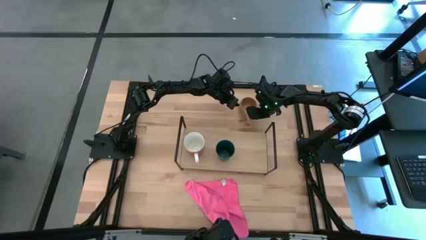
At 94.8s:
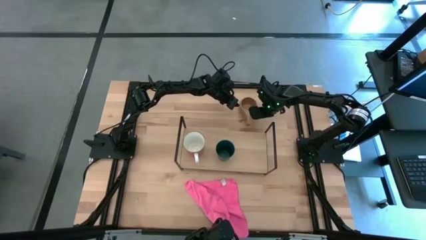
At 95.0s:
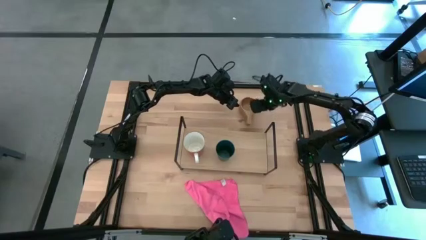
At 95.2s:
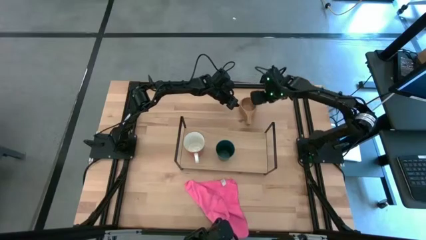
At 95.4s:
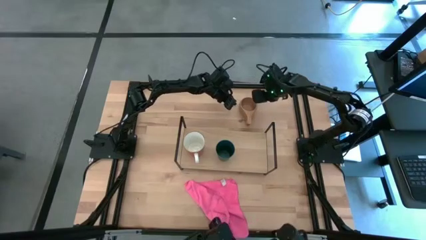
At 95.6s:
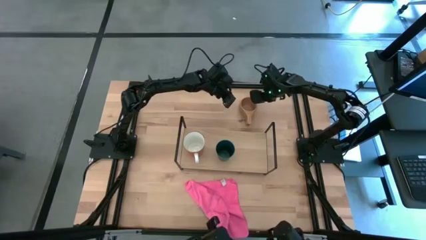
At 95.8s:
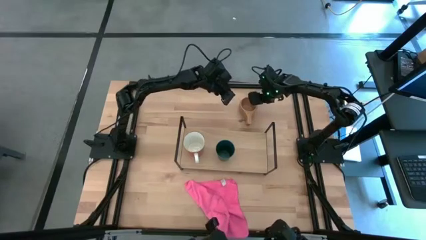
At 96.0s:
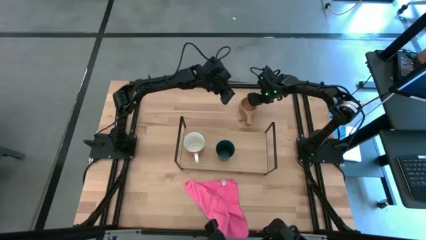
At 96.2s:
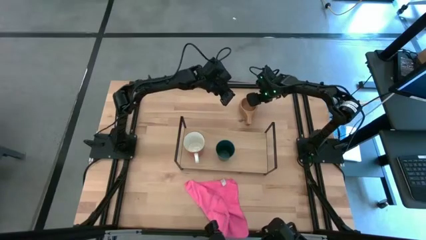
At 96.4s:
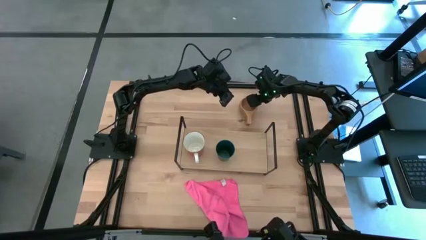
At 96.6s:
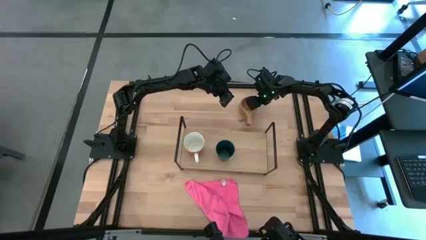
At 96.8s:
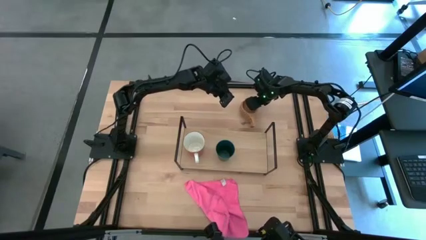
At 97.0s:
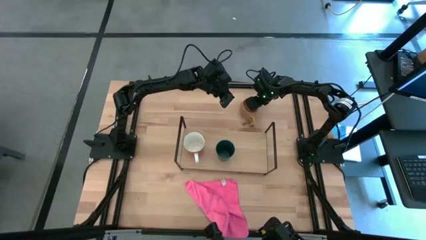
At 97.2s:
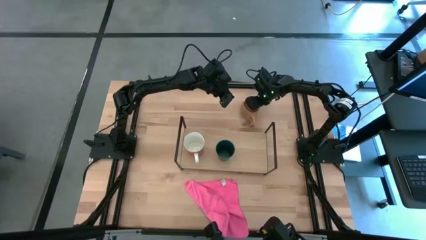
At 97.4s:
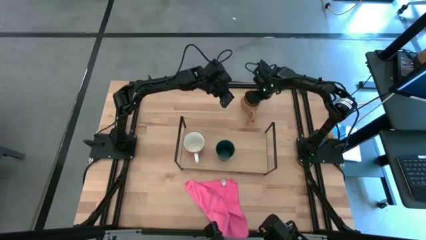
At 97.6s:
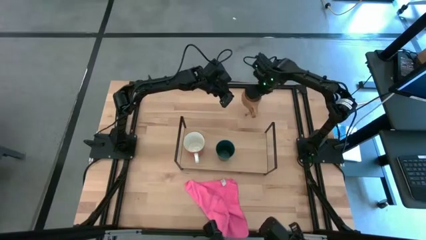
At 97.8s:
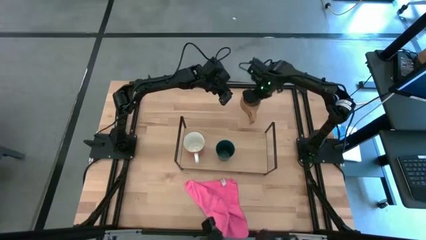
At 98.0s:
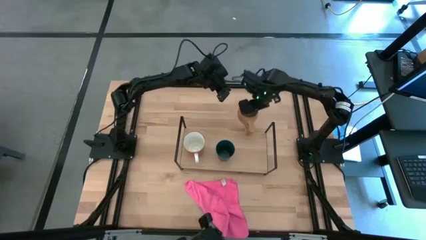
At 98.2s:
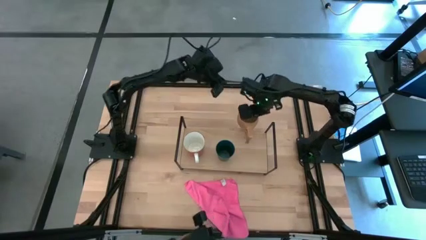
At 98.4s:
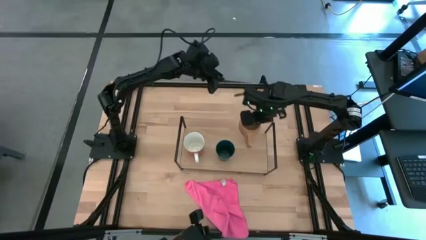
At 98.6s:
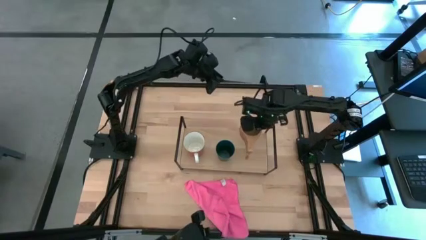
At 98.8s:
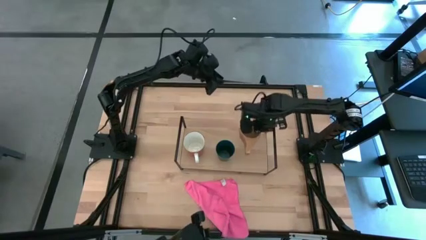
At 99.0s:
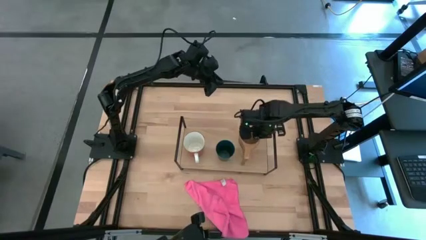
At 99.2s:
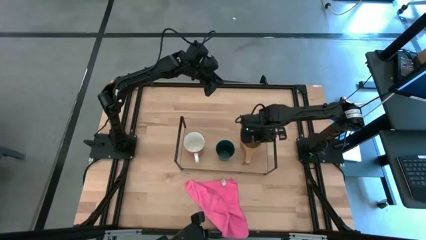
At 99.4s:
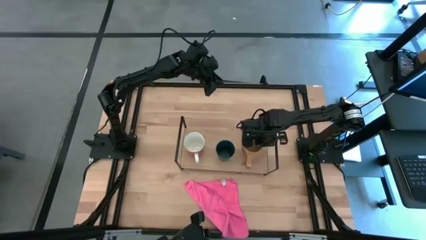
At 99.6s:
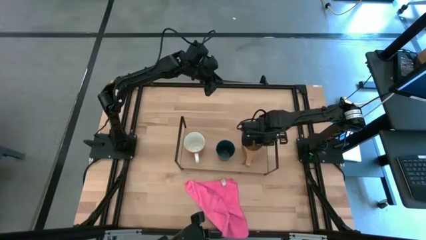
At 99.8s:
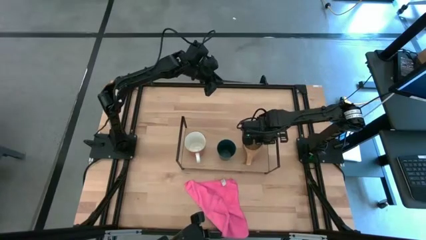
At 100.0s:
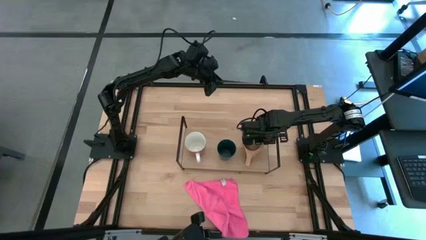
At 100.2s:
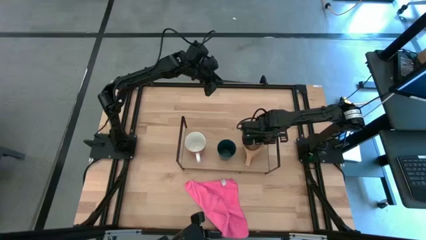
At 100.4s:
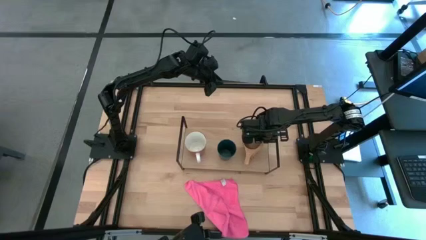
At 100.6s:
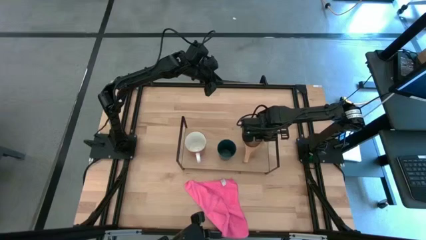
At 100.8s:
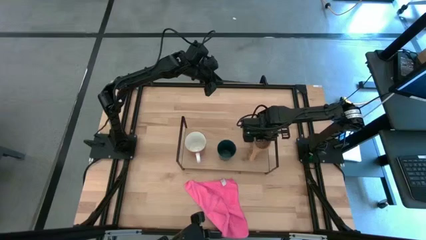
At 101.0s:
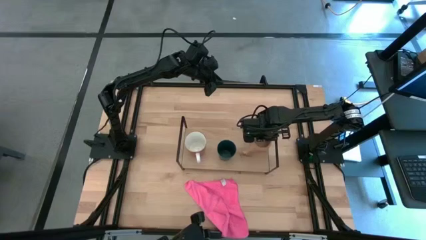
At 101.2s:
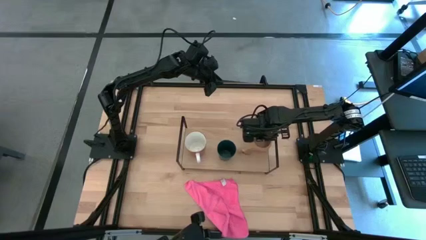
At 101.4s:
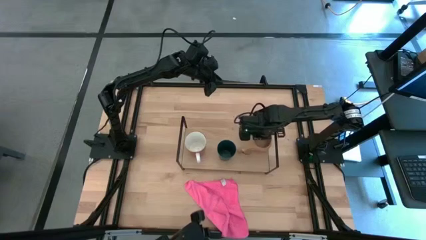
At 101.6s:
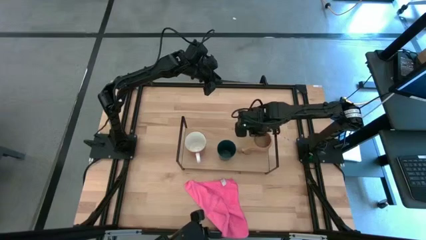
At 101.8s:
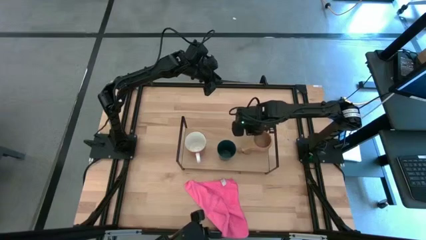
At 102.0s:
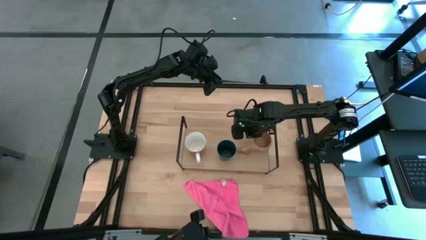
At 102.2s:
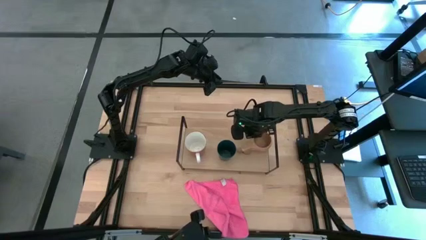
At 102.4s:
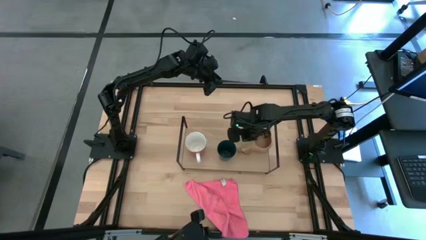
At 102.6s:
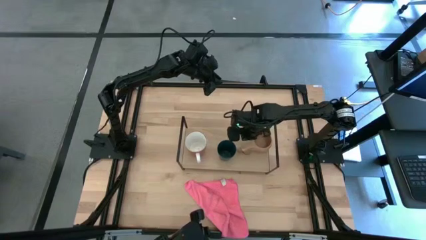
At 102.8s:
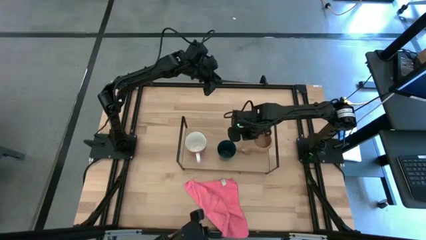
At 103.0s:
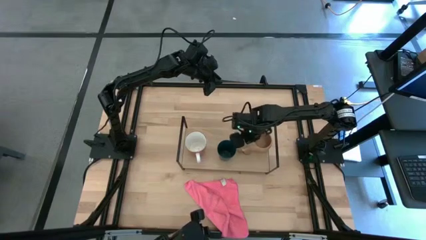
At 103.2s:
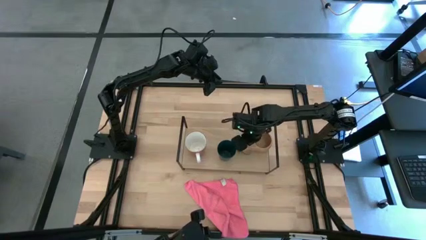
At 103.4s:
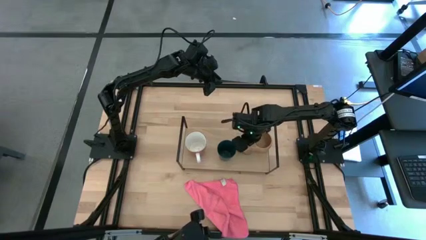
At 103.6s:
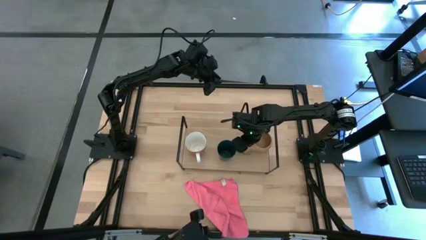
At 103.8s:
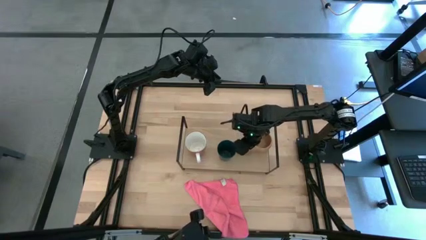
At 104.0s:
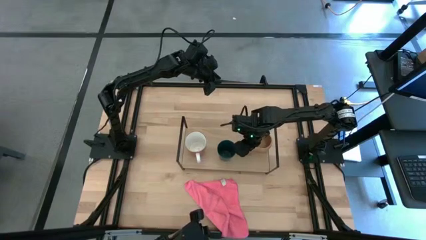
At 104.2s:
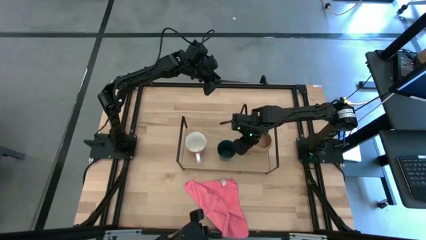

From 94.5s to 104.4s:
Task: Stack small to large cups/mugs on shelf
Put wooden mug on the shelf

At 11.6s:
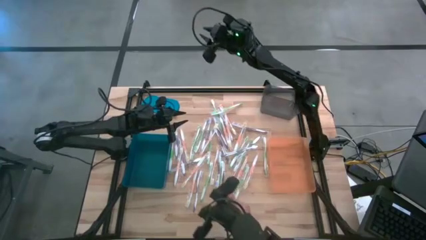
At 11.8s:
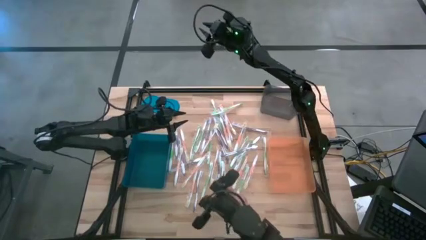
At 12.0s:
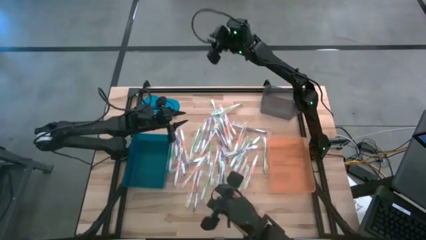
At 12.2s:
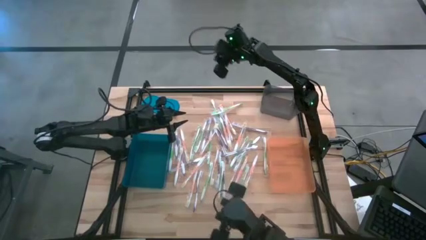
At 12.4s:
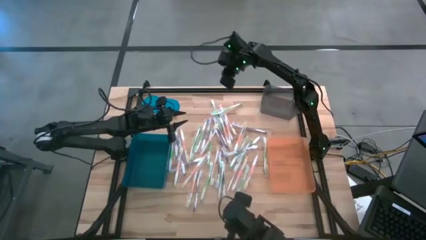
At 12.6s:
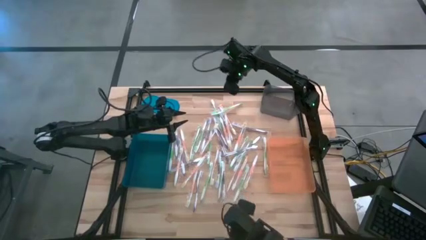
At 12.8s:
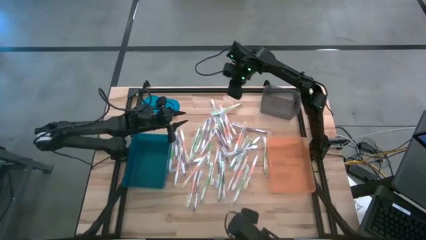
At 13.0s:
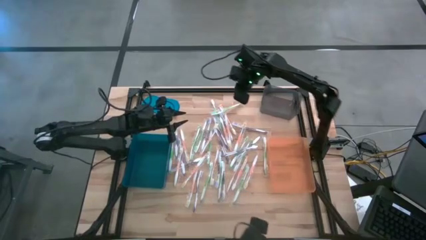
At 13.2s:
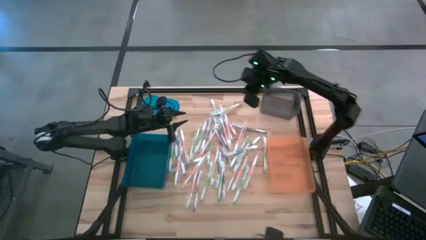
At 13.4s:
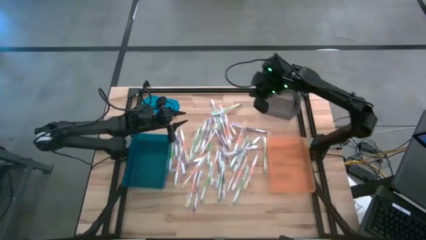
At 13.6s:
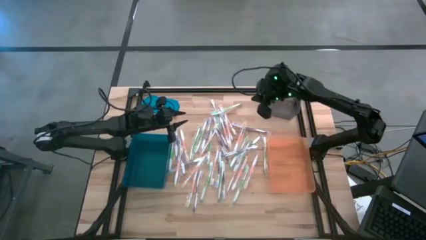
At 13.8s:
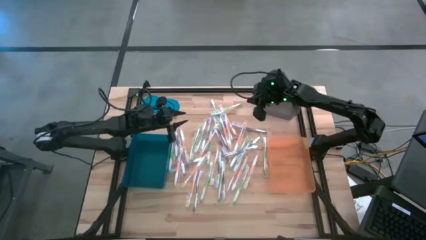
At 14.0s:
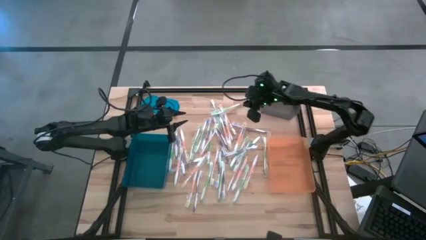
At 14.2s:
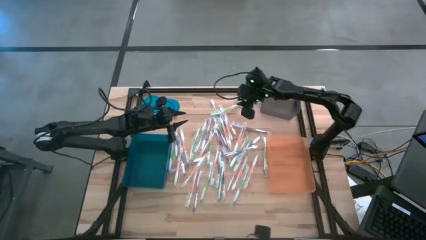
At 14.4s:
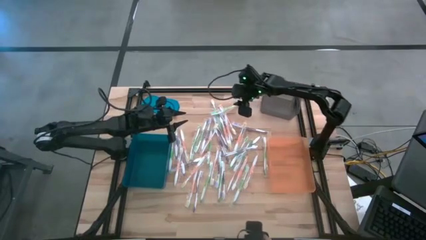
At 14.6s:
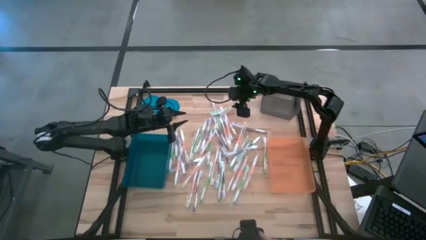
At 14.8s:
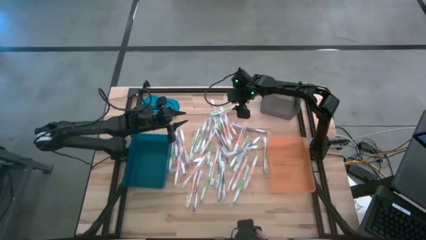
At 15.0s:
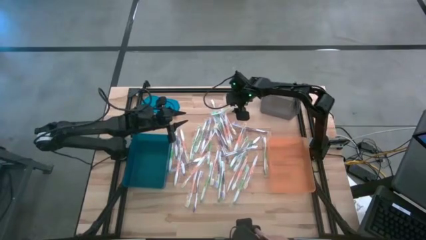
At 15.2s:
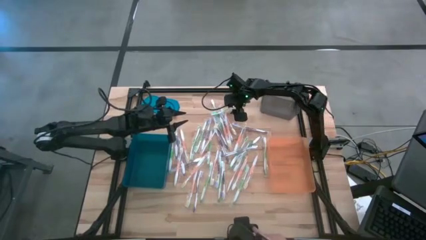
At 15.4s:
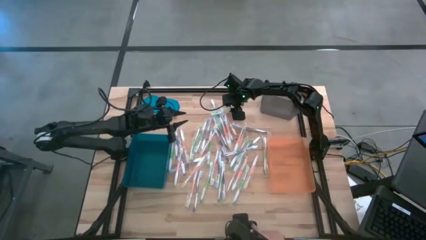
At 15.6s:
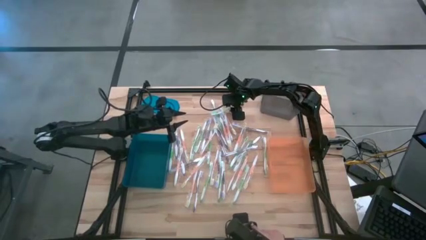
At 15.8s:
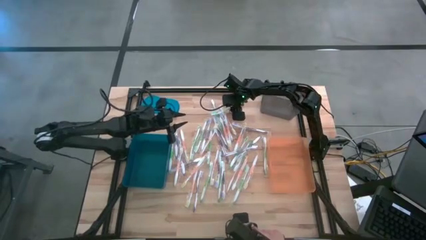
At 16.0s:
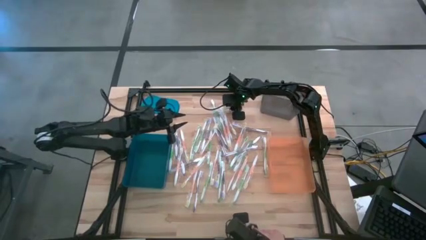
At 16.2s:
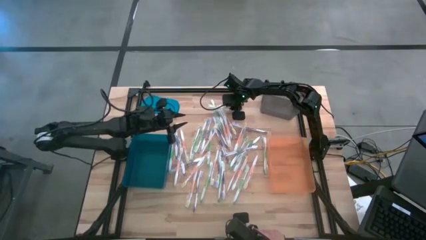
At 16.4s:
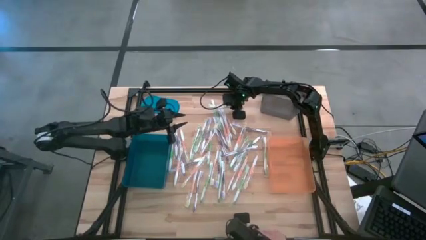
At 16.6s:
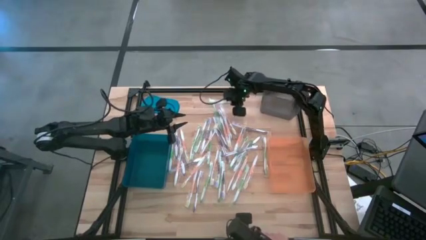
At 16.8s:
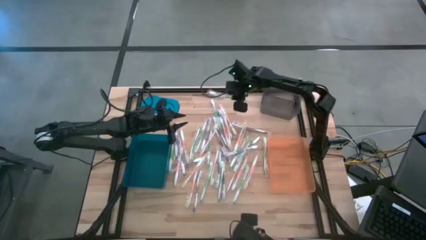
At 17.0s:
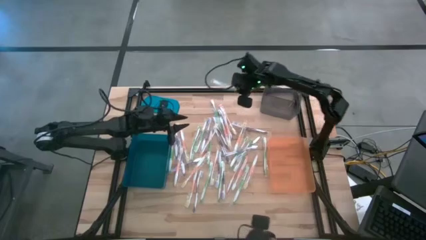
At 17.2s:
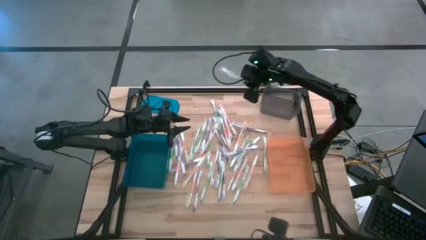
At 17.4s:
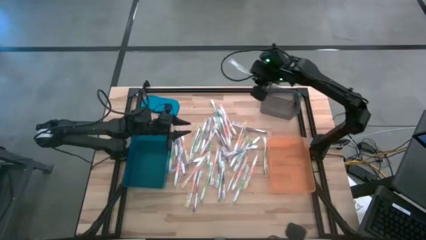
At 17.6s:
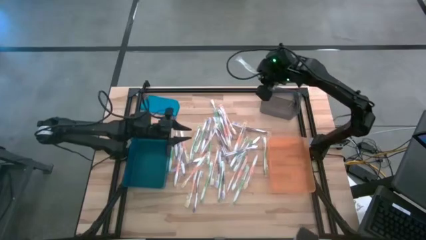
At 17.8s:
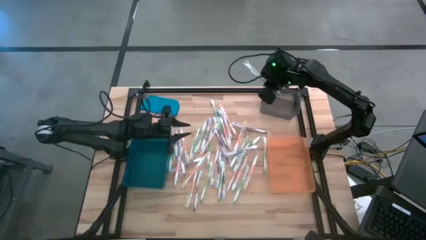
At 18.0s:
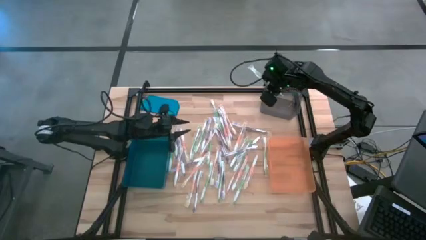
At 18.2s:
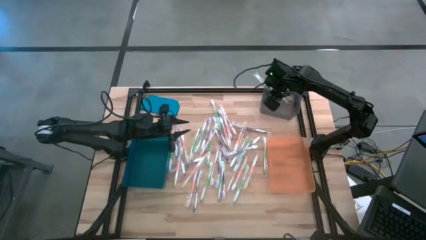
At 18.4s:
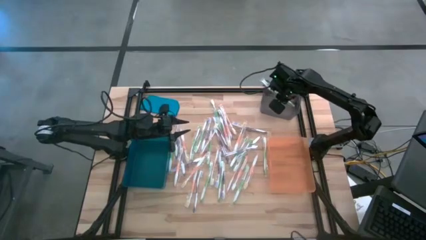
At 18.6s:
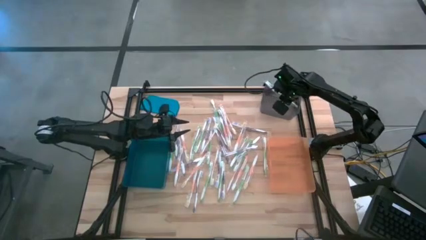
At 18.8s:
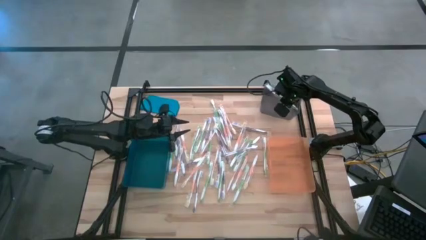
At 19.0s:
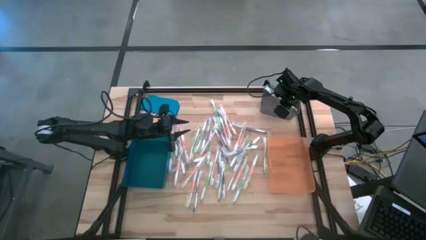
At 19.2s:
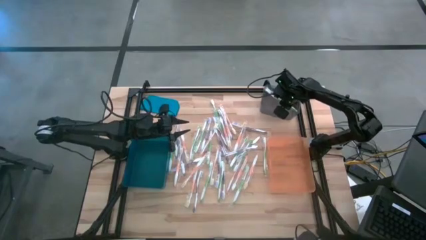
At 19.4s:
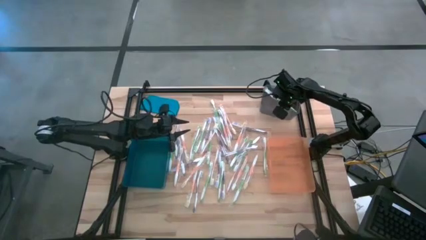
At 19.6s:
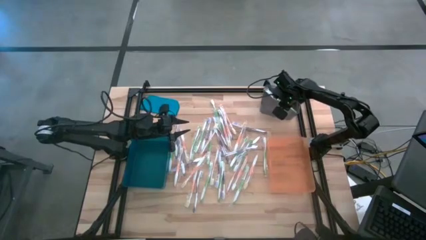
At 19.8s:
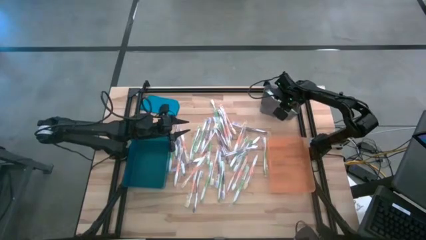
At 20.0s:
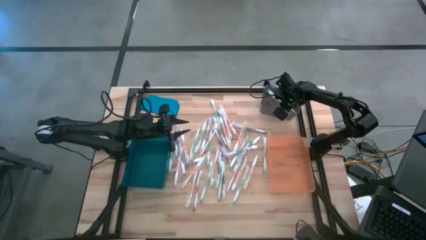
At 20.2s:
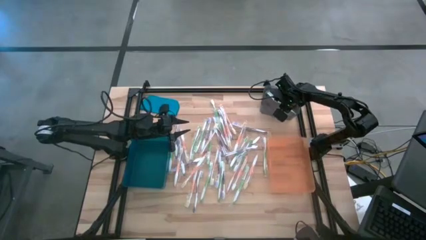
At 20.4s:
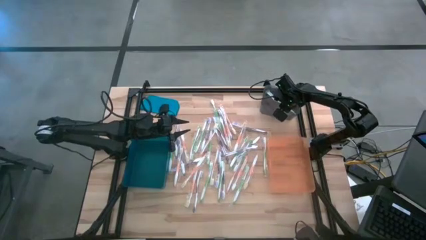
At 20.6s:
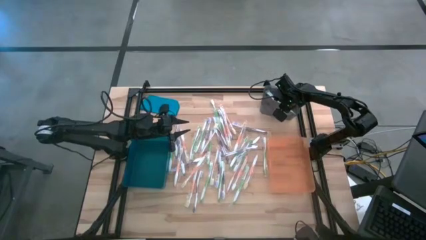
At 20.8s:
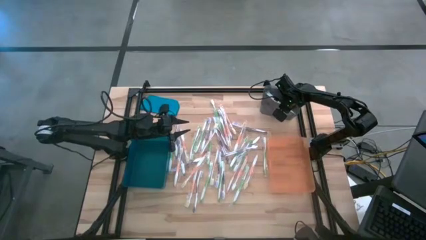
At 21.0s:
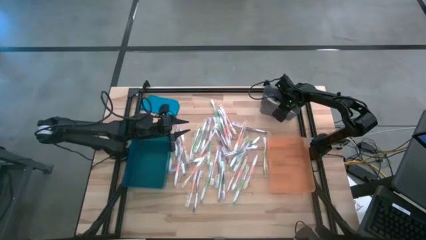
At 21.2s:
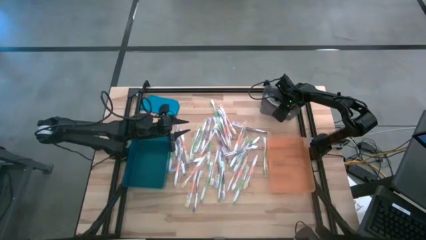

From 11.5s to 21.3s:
Task: Pick & Place Toothbrushes
Put the green toothbrush into the black bin
